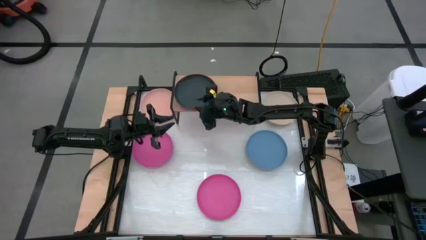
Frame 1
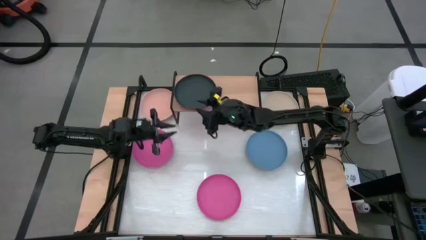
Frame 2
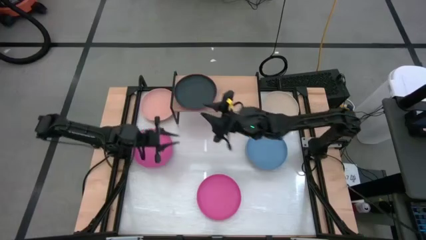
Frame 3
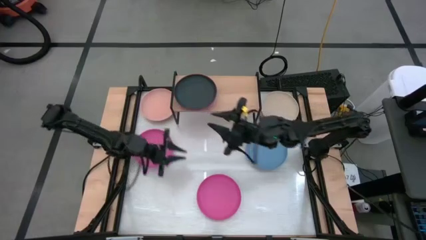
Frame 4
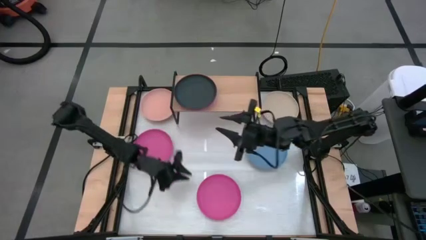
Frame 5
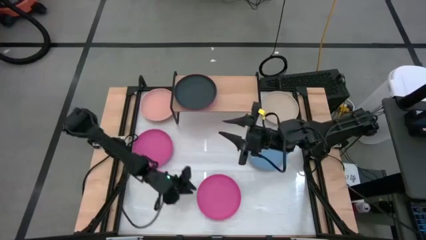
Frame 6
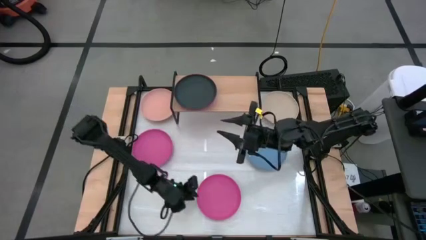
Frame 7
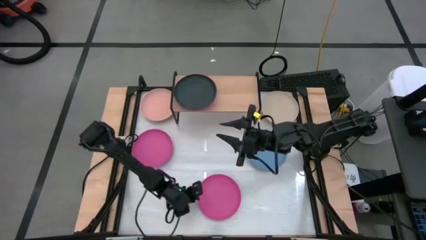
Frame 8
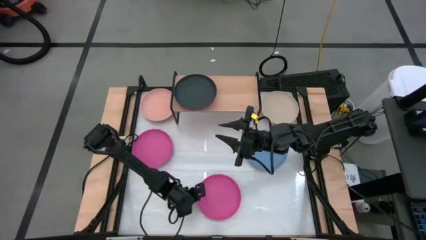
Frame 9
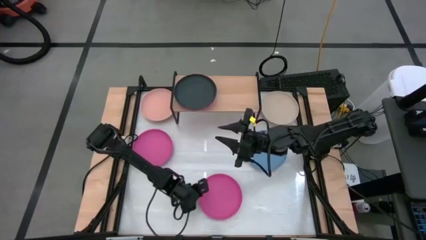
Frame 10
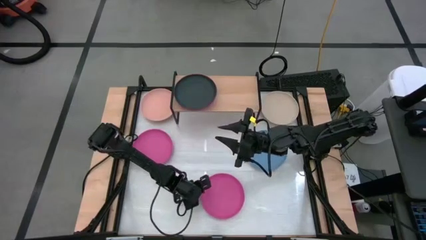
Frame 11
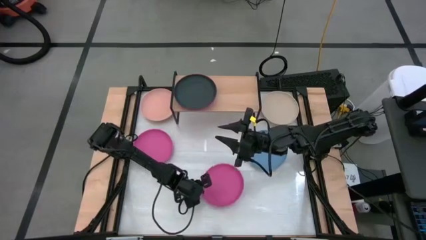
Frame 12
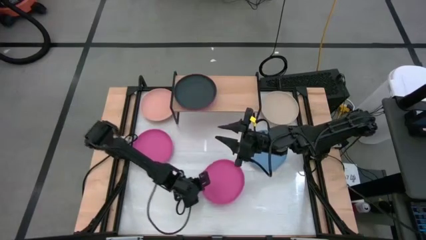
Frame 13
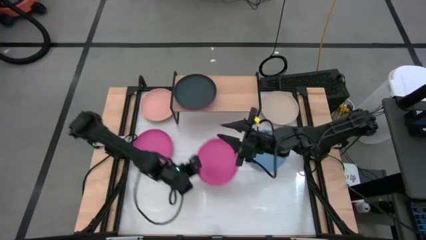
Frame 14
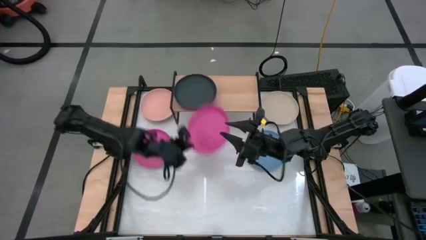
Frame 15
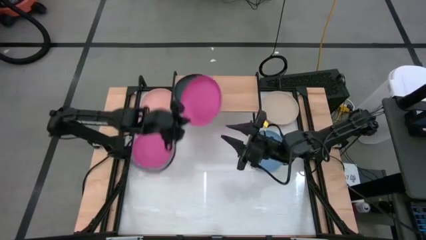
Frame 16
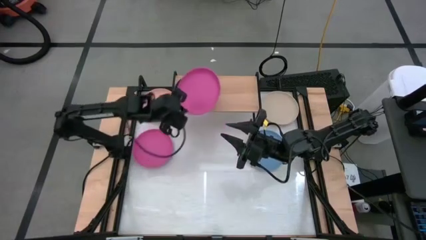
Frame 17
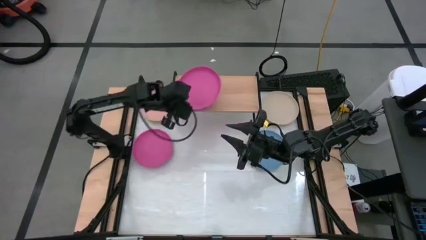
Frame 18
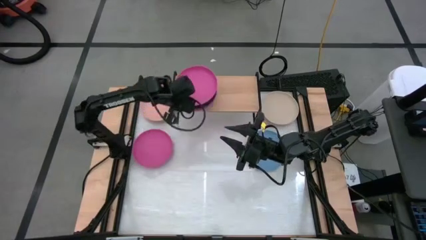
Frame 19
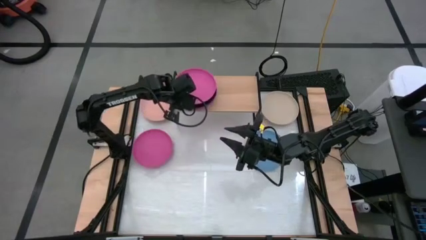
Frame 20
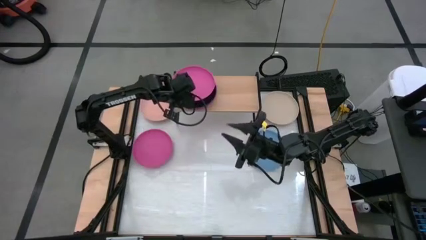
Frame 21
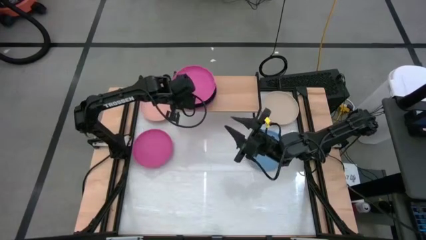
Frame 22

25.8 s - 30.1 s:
Task: Place and stack plates onto a shelf
Stack the bottom pink plate on top of the black plate on the shelf

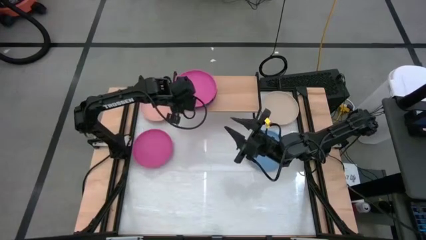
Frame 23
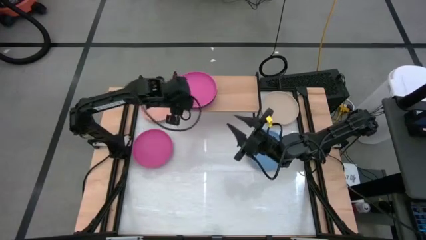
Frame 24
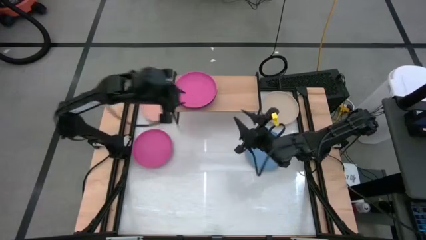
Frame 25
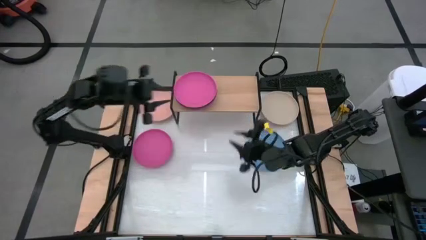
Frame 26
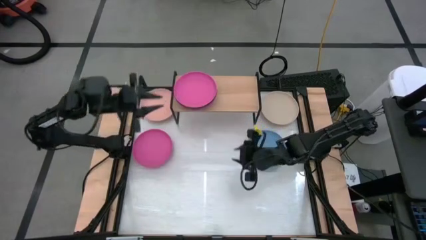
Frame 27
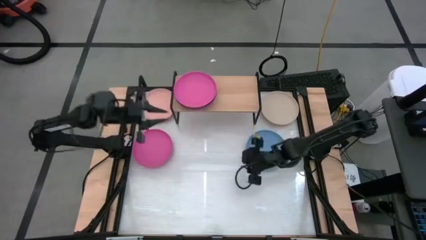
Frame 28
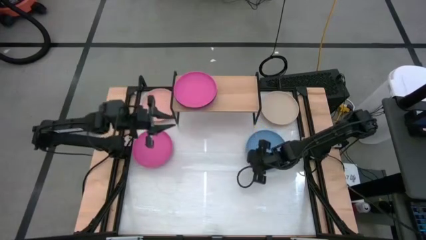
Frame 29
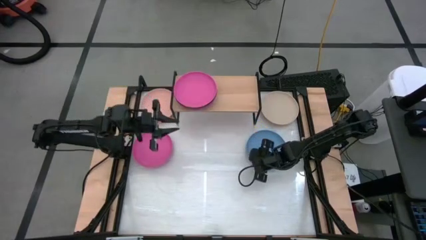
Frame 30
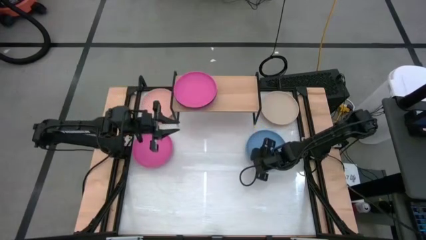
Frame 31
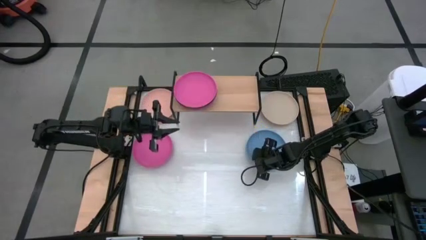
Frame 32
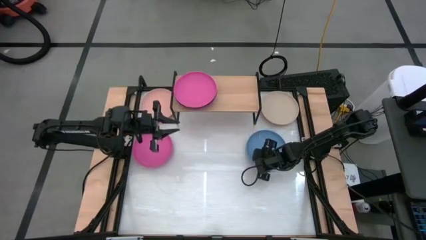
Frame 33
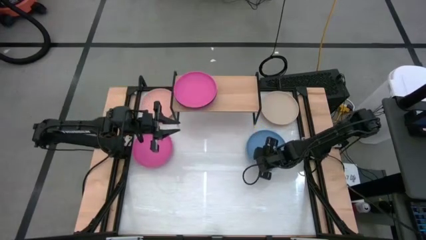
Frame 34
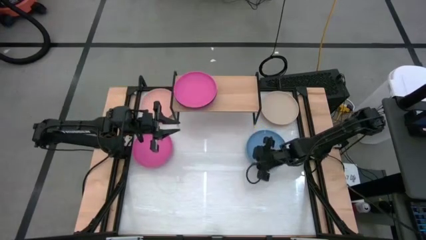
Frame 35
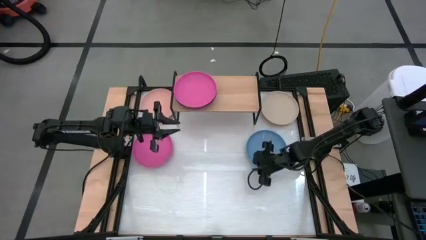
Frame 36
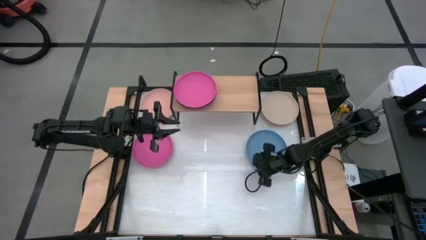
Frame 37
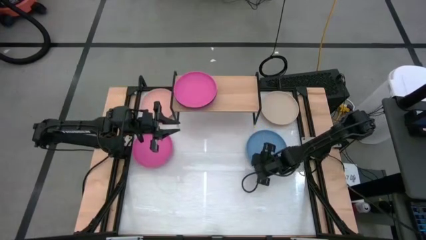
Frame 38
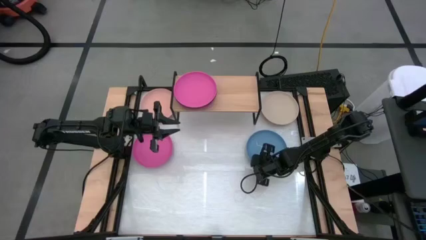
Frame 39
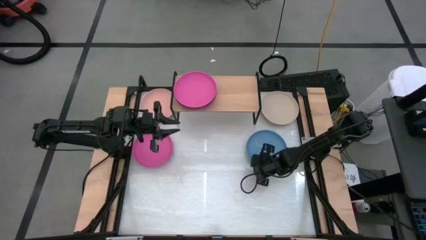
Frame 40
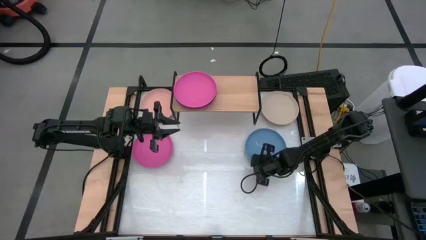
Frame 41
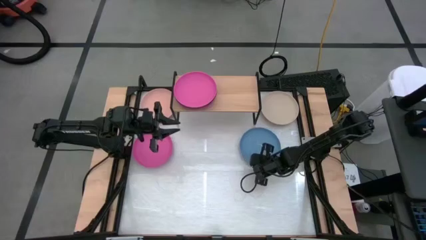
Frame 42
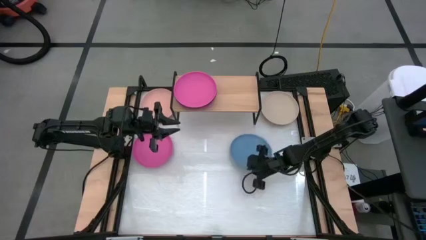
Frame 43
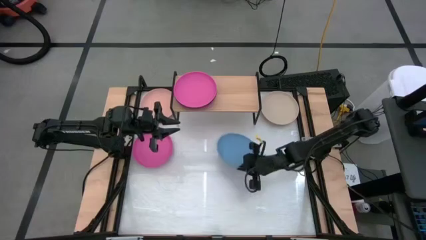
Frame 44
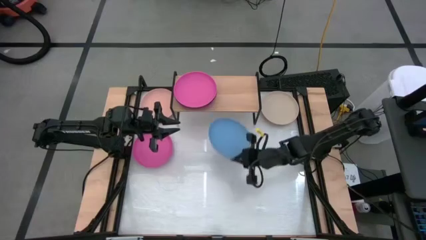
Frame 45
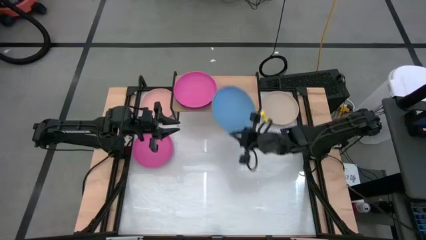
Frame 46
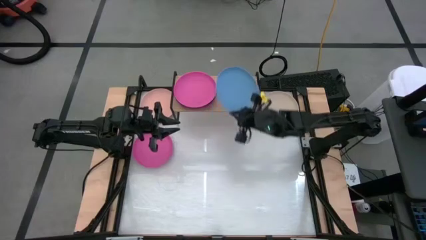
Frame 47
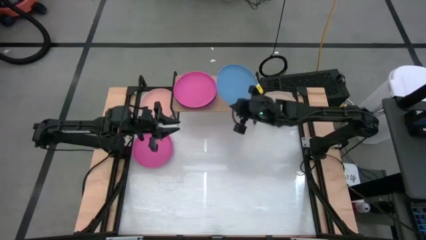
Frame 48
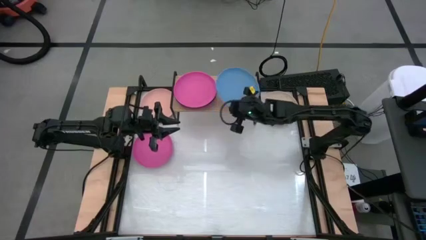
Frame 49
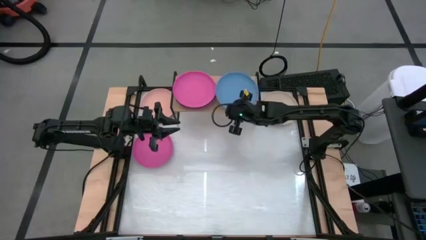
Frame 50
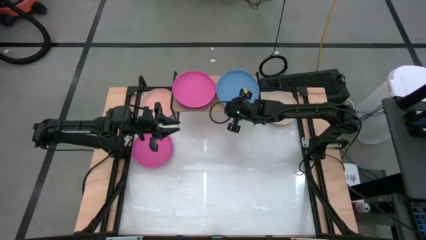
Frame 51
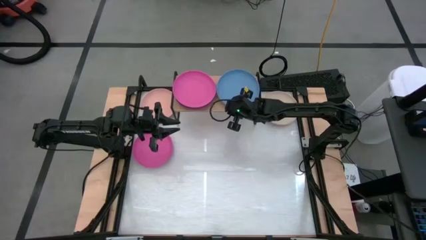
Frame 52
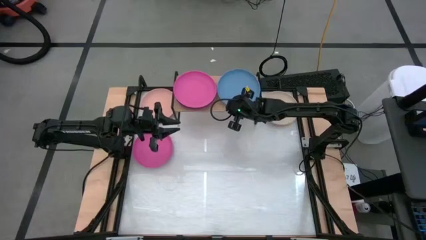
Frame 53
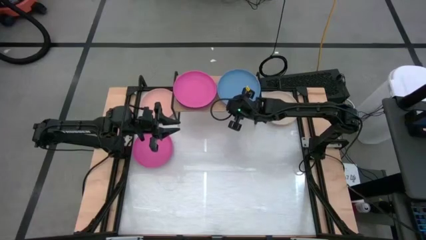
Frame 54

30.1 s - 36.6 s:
Put the blue plate on the shelf

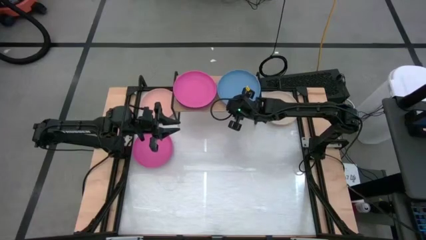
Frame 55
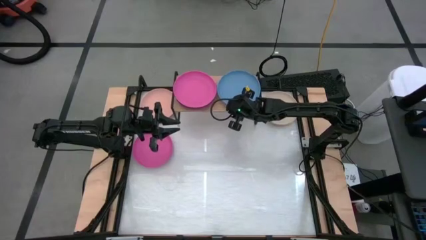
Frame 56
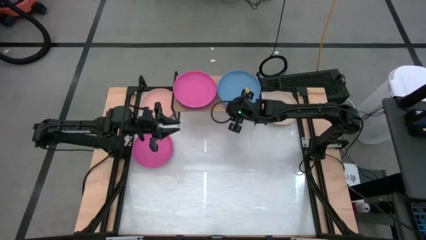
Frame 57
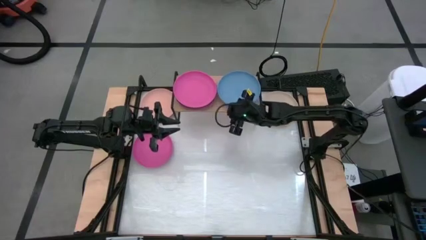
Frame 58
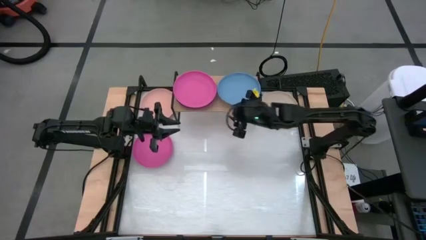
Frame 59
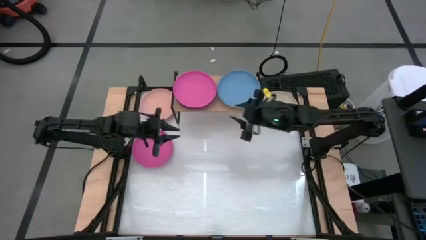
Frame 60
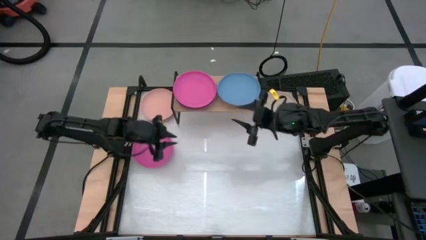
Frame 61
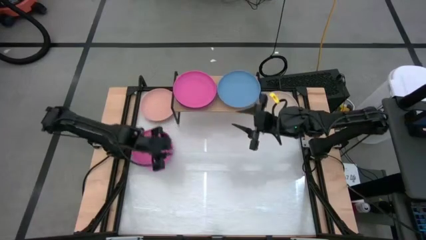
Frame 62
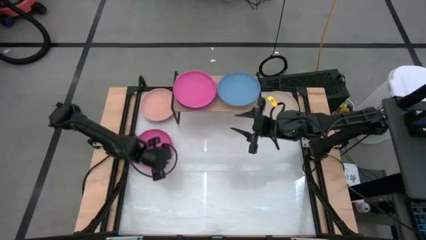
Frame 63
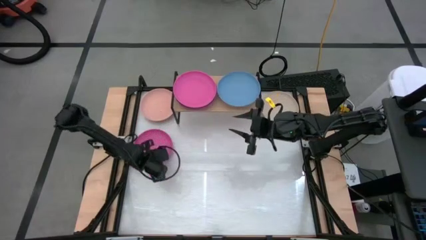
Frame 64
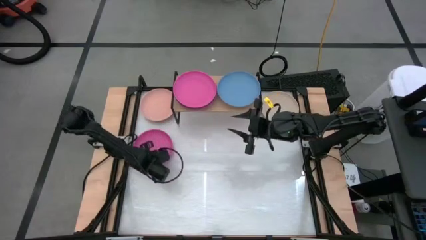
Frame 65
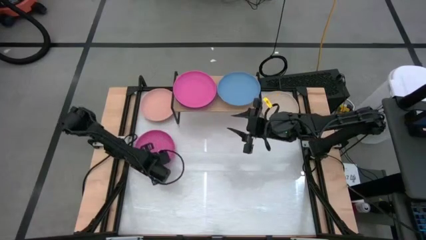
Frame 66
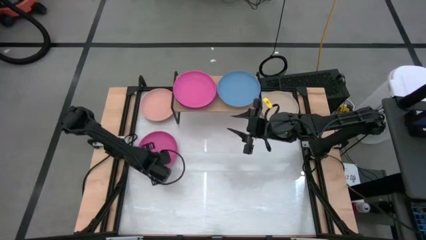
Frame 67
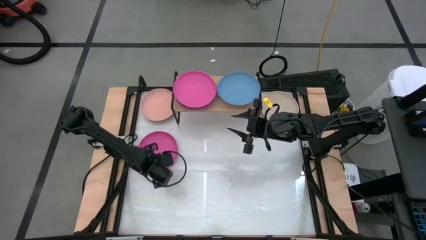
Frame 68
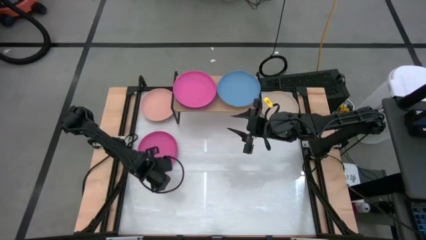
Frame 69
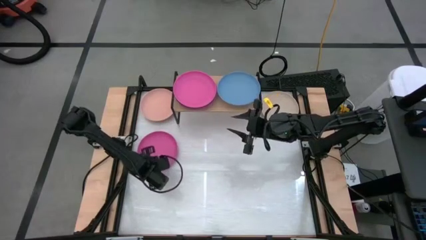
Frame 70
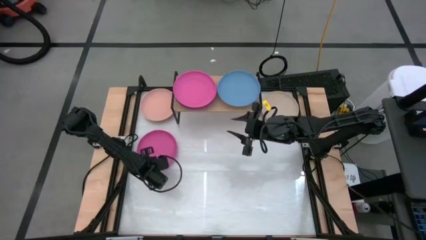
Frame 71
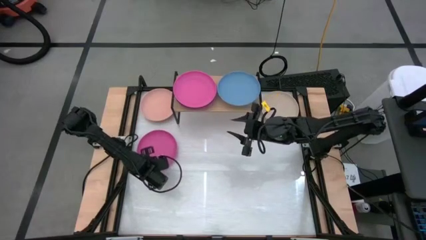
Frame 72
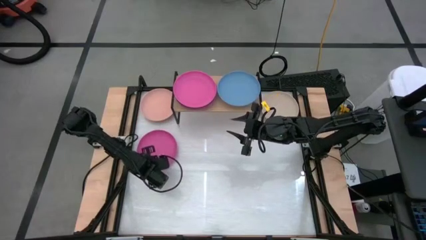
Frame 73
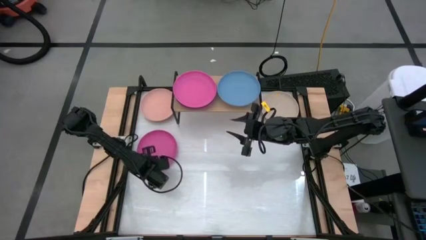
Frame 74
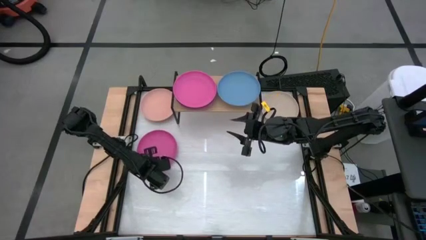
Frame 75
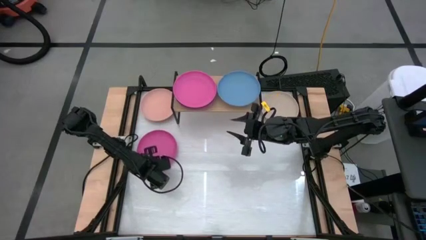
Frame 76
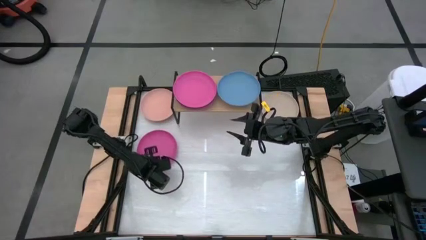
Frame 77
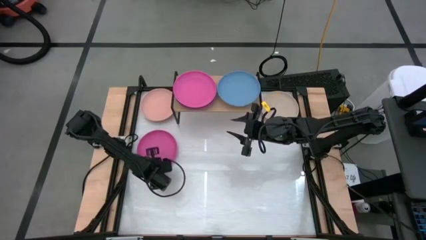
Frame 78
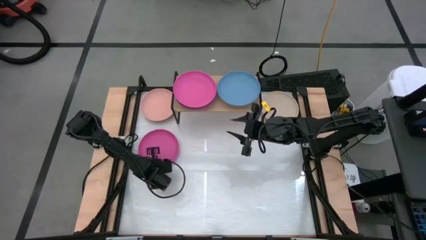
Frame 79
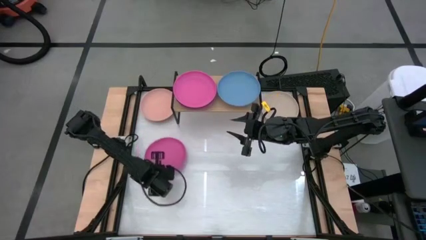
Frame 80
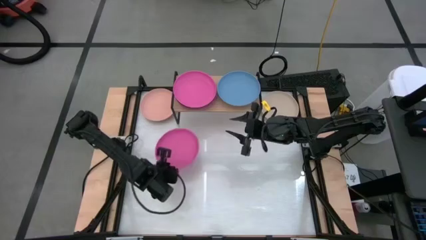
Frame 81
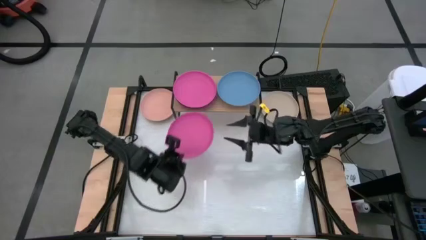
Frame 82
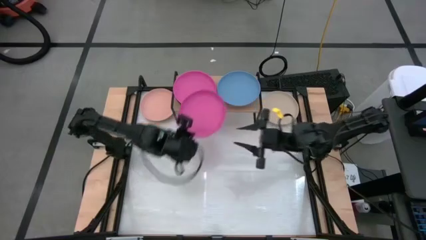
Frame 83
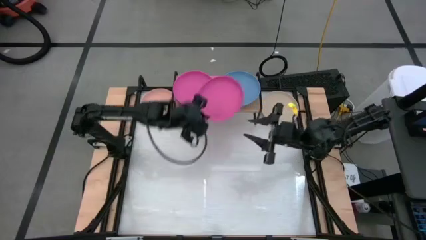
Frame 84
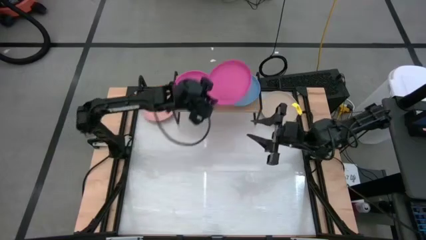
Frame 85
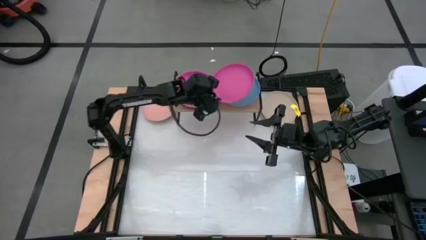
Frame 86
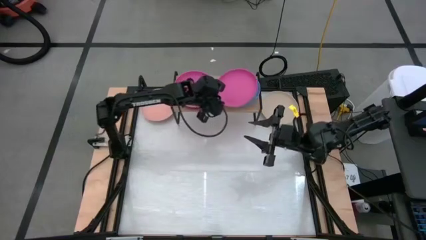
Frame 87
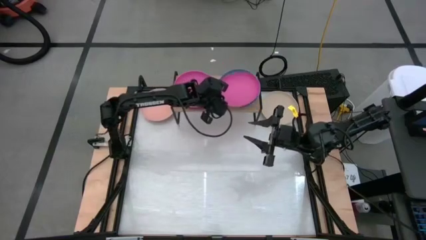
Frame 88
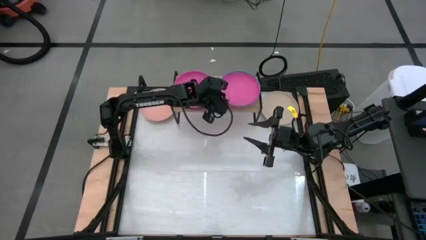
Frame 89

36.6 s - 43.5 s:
Stack the pink plate on top of the blue plate on the shelf
